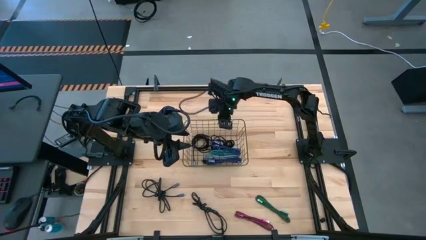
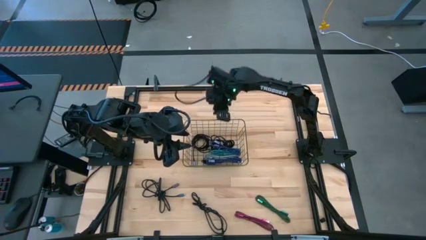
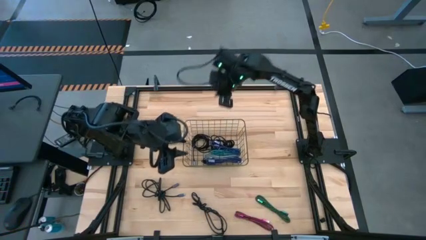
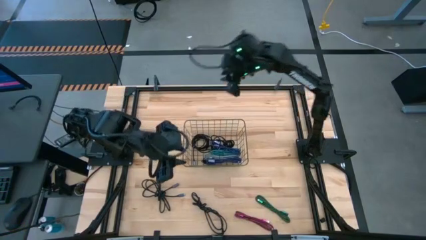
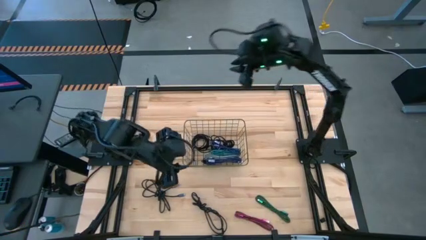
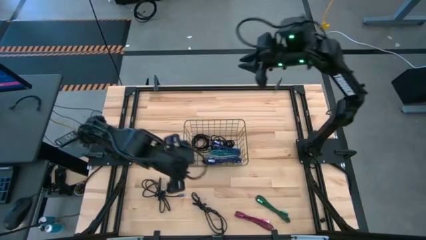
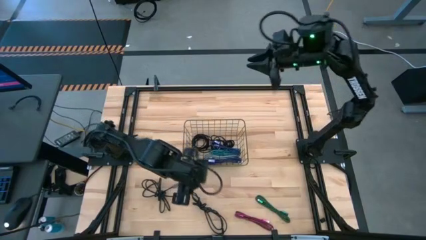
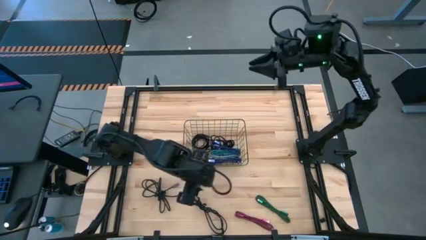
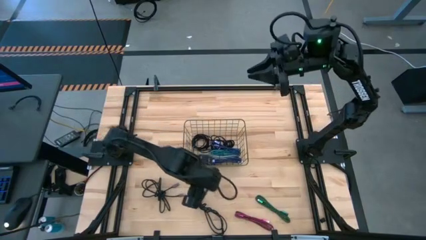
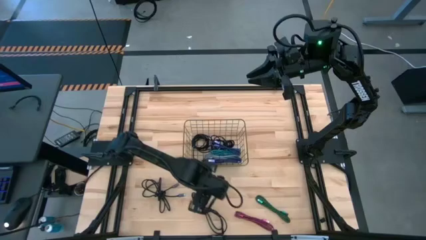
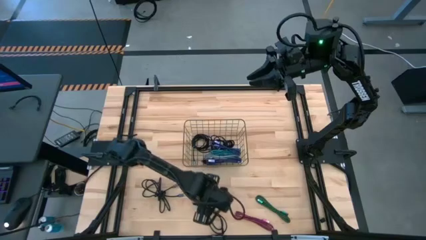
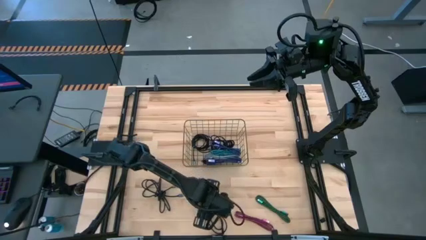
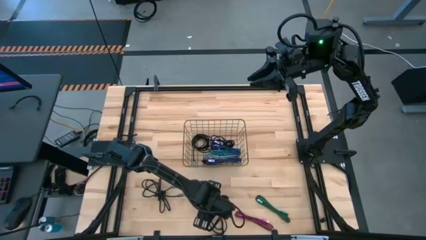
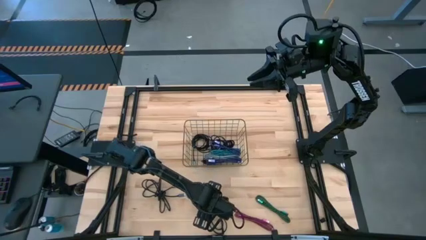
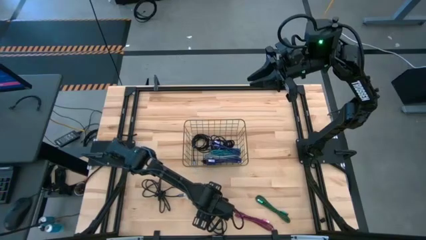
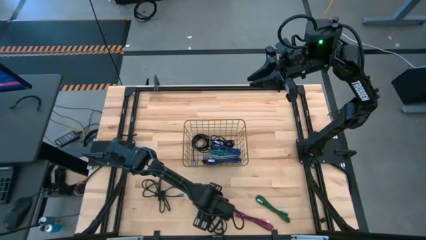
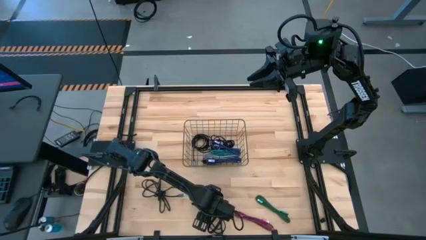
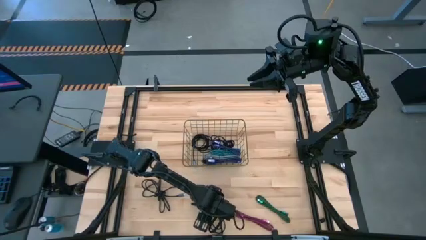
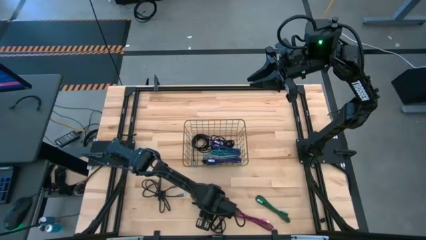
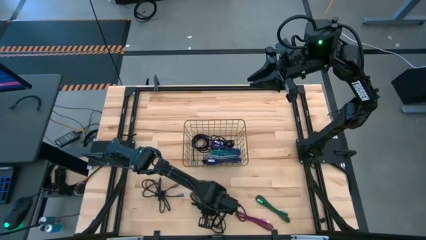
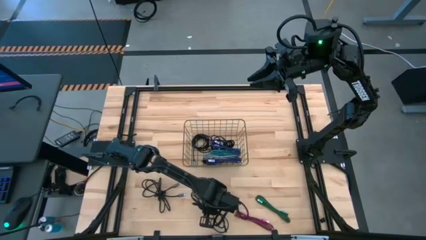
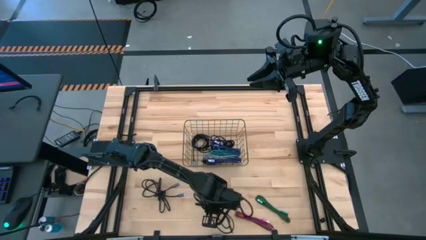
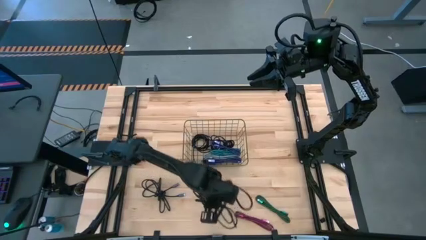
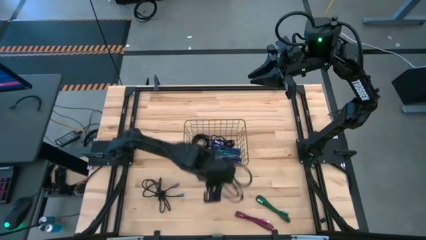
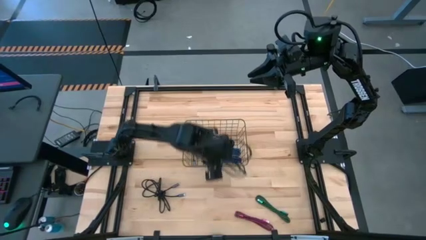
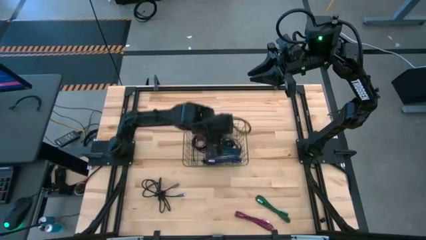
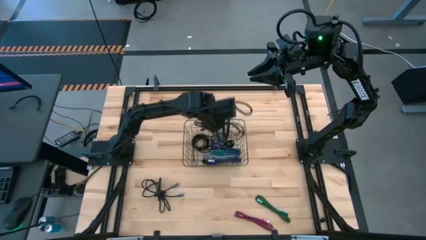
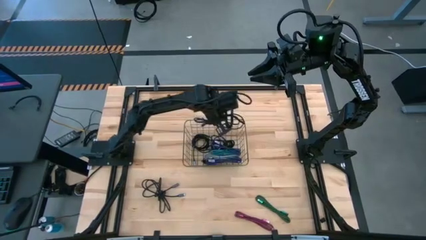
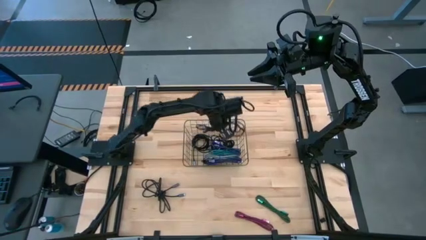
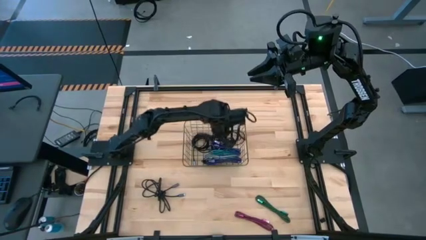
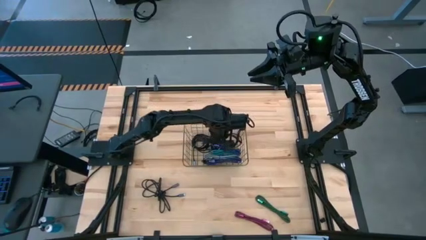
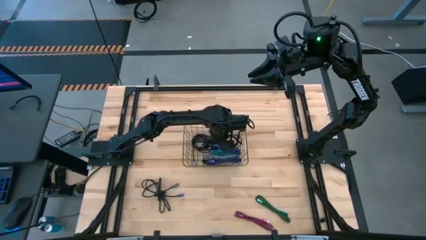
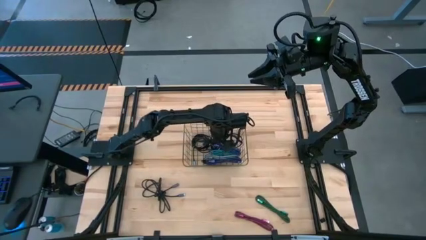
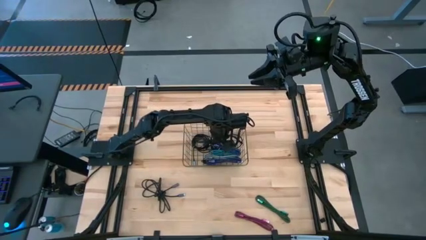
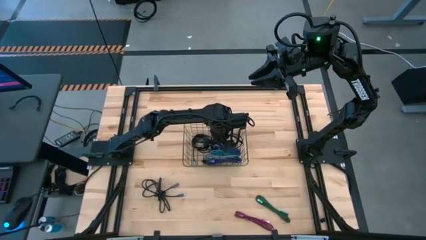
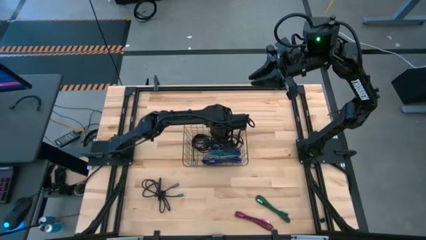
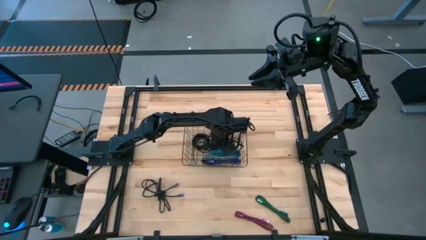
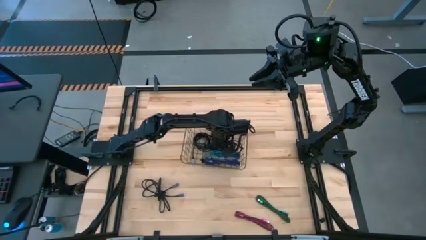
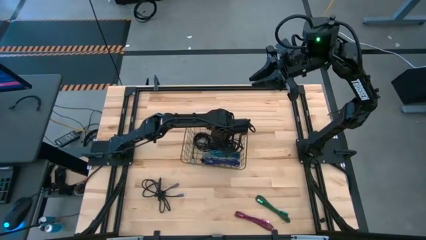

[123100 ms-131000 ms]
Task: Pick and place USB-C Cables
Put the black charger cable into the wire basket

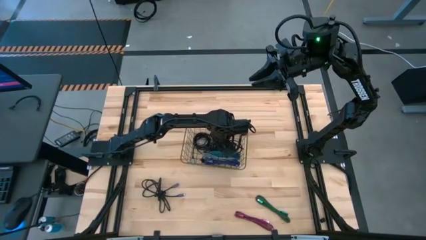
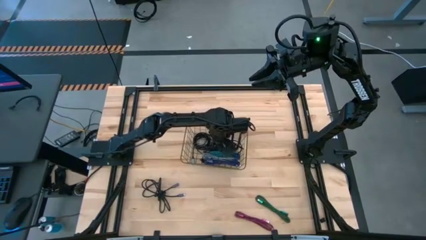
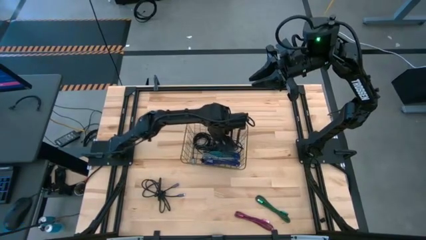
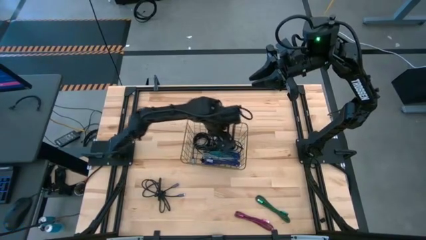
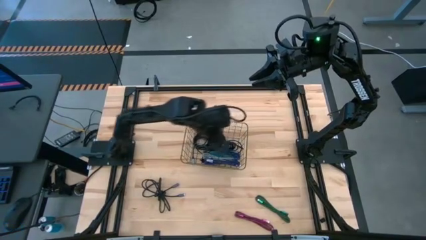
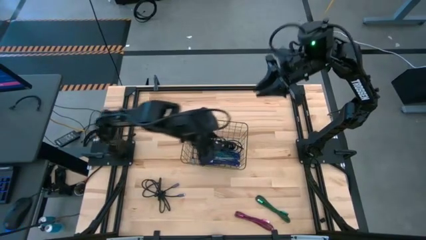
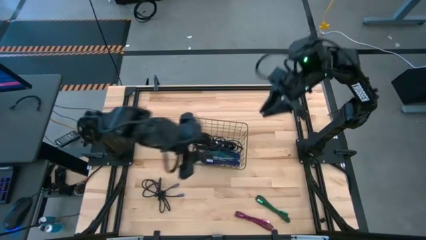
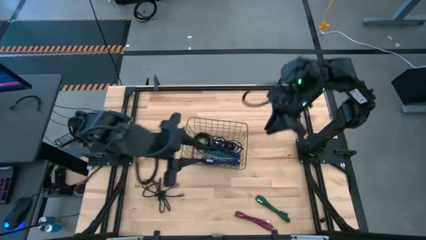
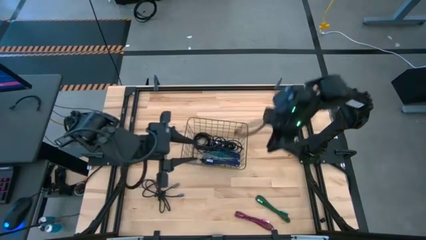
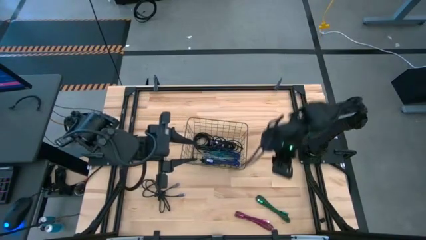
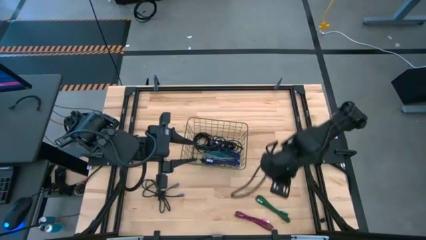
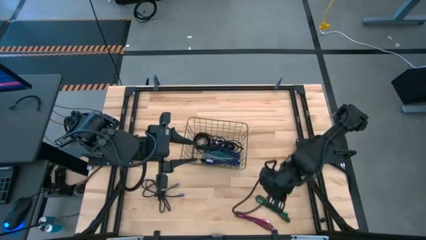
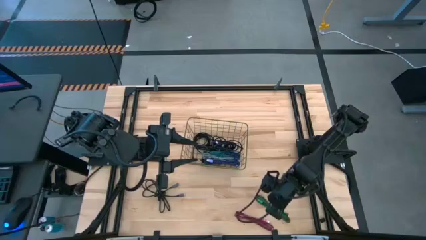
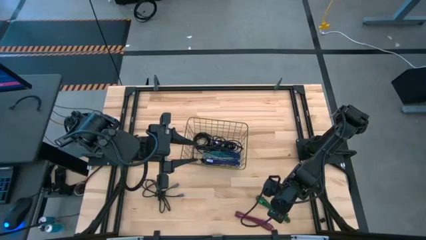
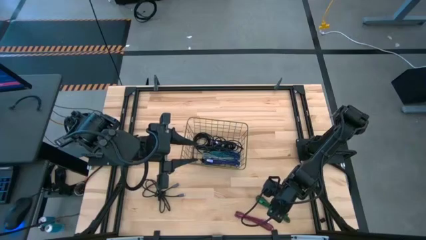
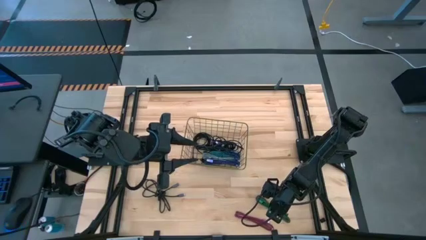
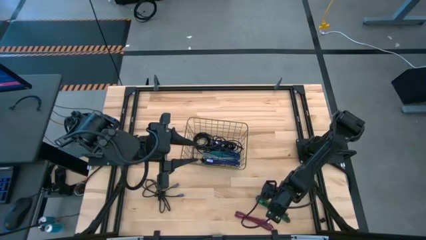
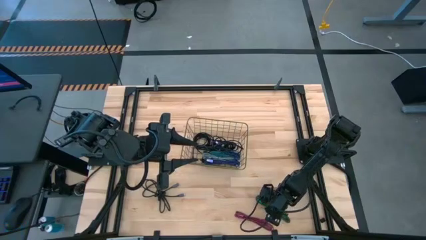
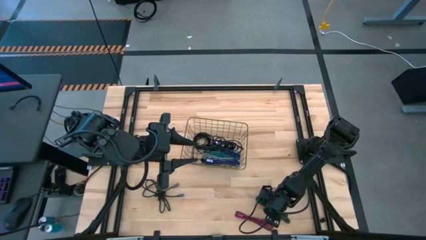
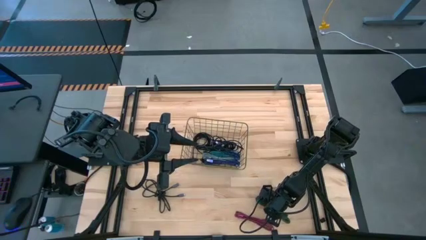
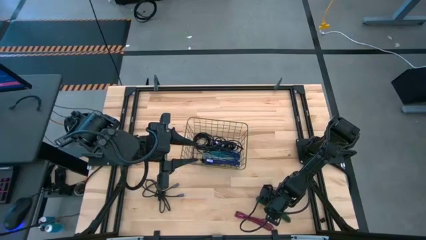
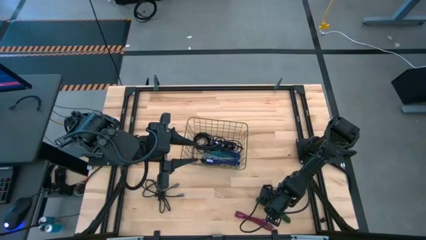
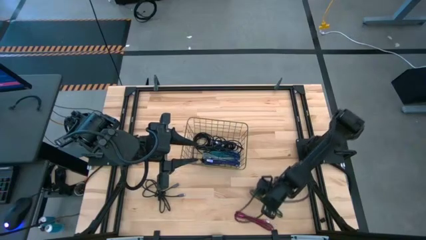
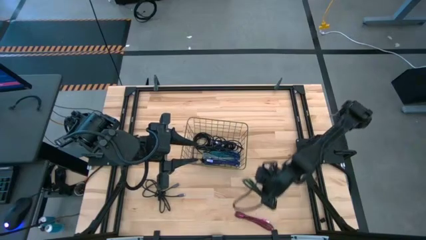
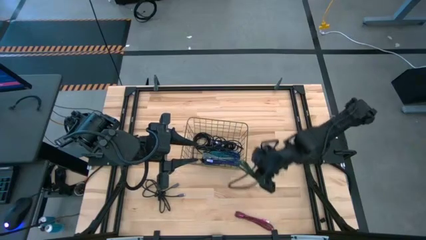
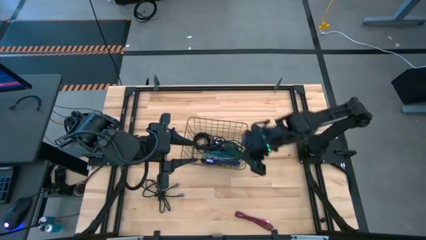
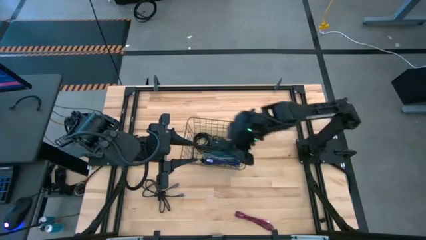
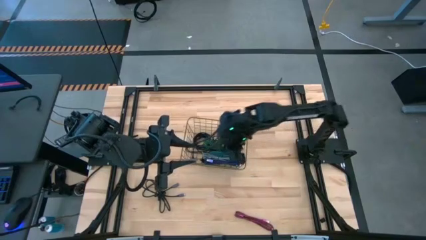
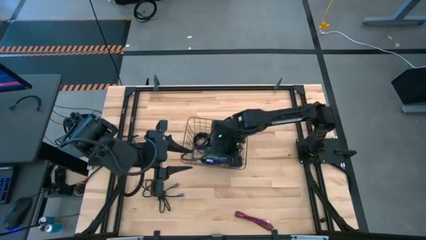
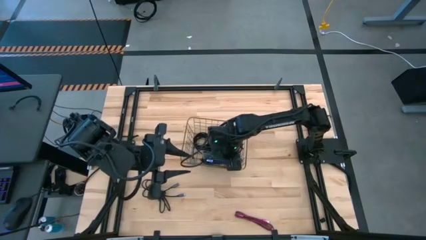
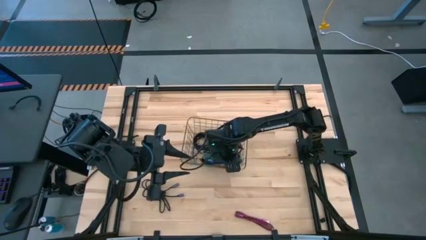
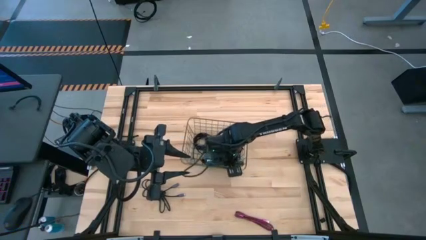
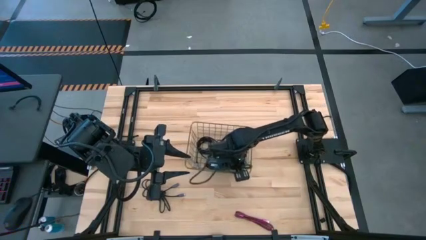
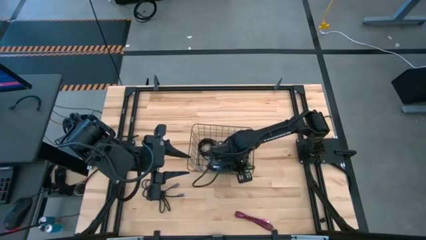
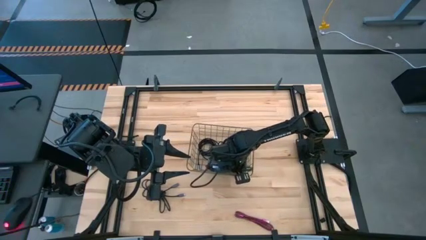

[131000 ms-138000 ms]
Put the green charger cable into the wire basket
